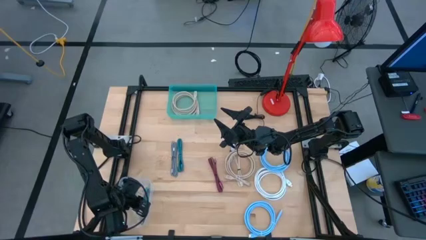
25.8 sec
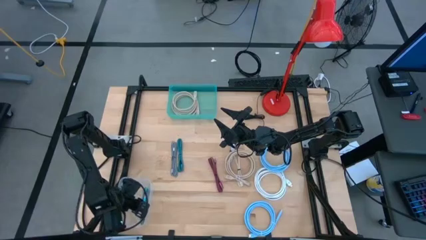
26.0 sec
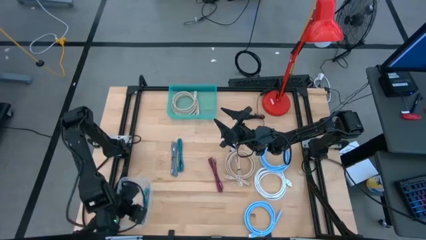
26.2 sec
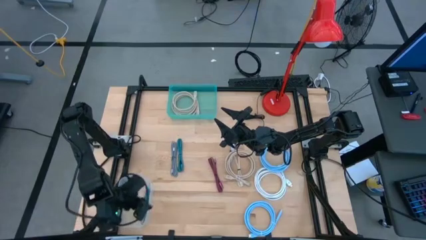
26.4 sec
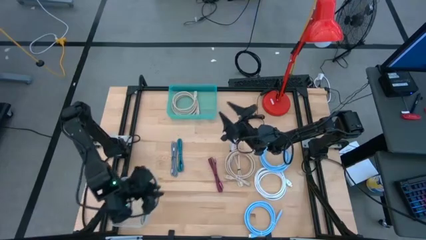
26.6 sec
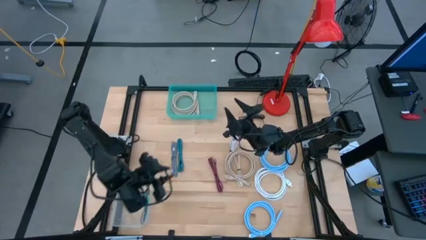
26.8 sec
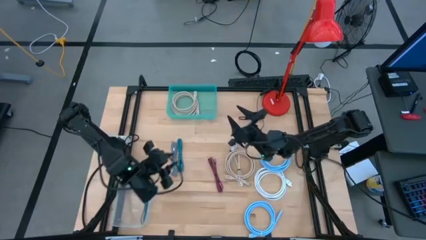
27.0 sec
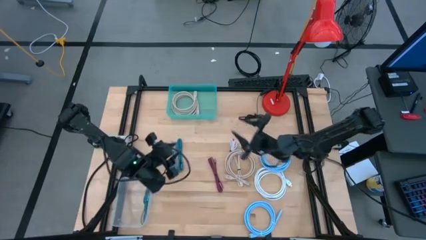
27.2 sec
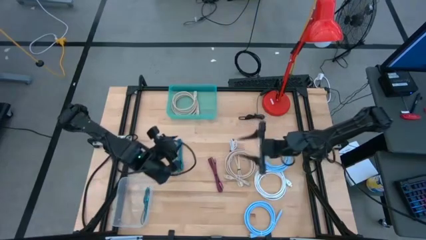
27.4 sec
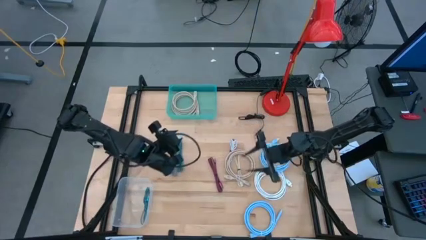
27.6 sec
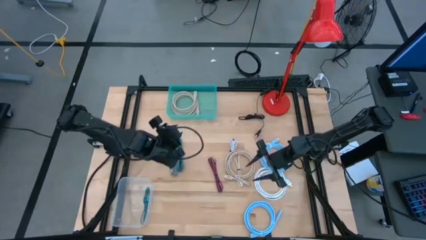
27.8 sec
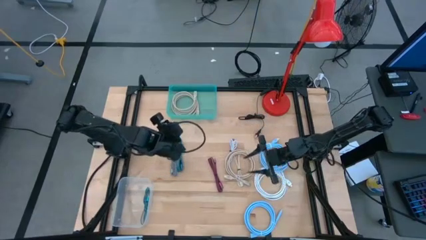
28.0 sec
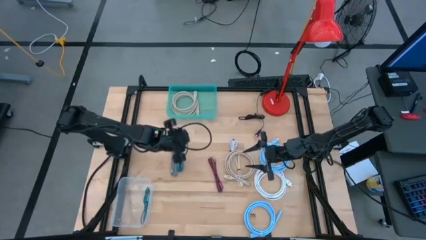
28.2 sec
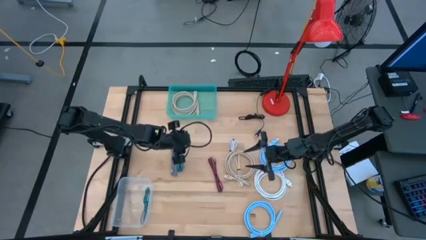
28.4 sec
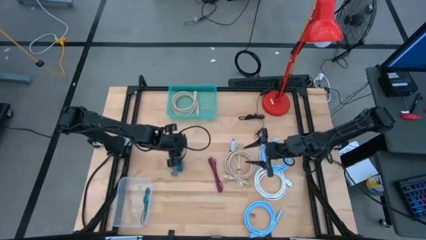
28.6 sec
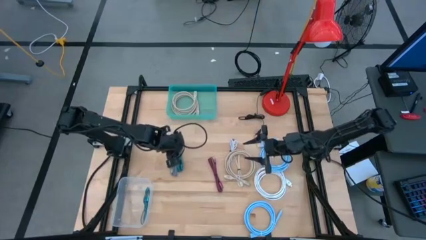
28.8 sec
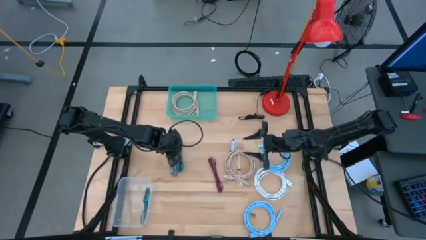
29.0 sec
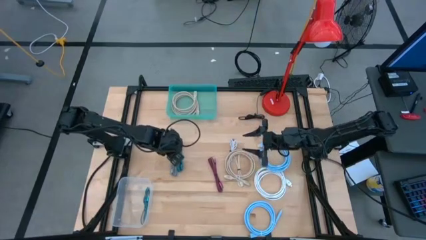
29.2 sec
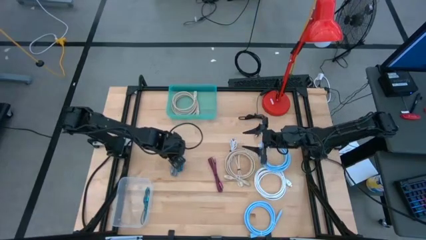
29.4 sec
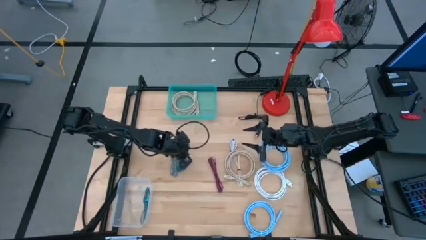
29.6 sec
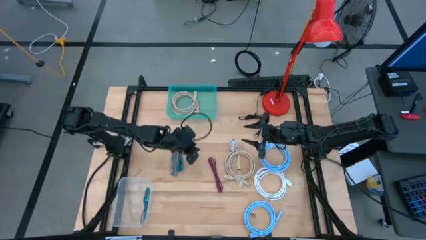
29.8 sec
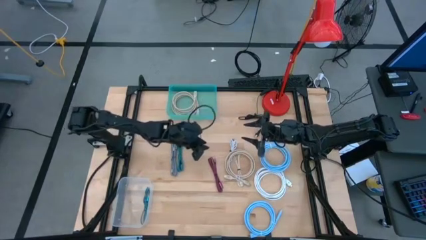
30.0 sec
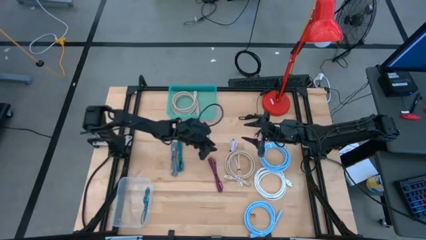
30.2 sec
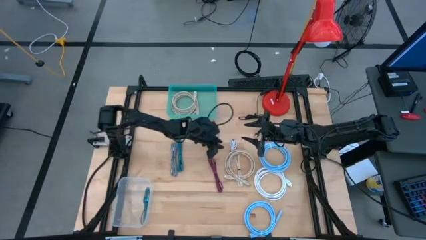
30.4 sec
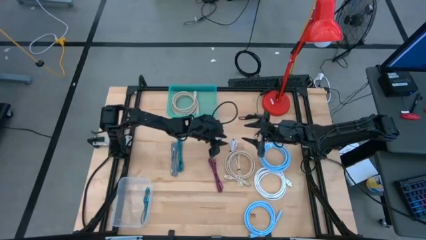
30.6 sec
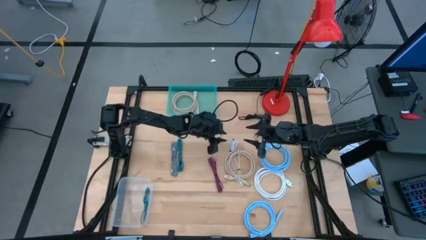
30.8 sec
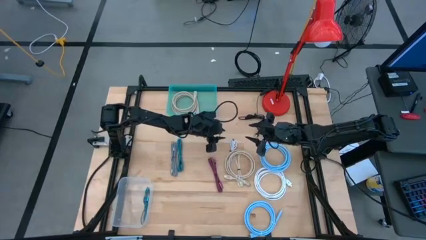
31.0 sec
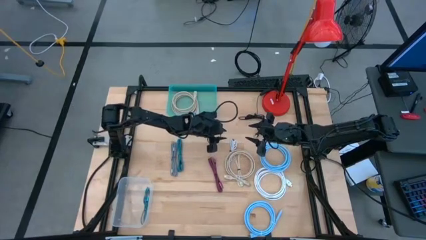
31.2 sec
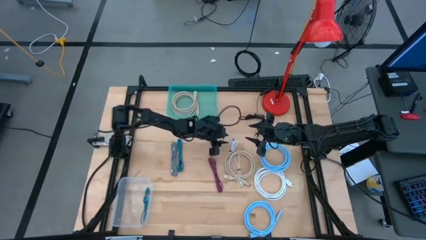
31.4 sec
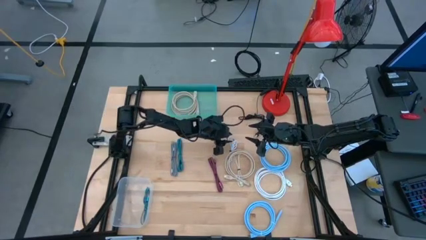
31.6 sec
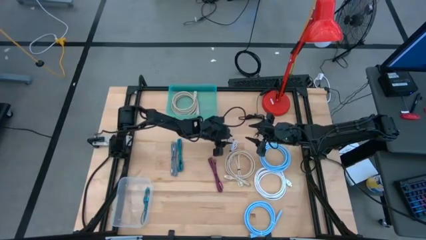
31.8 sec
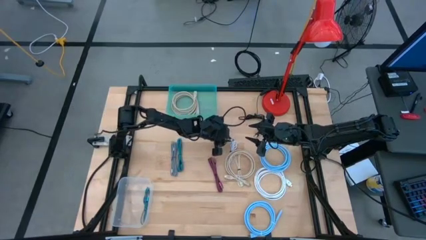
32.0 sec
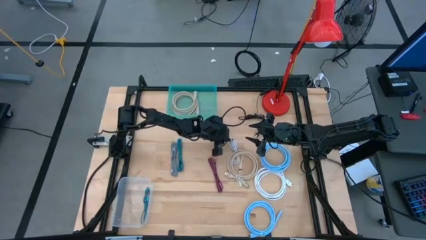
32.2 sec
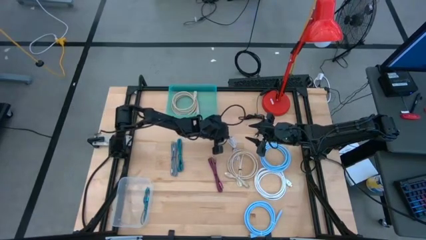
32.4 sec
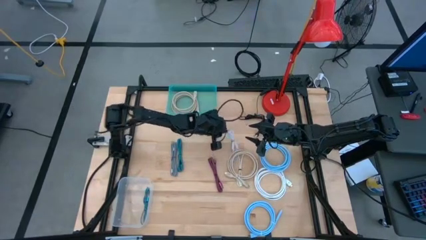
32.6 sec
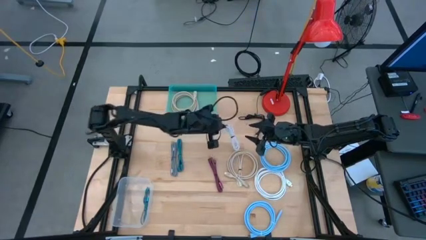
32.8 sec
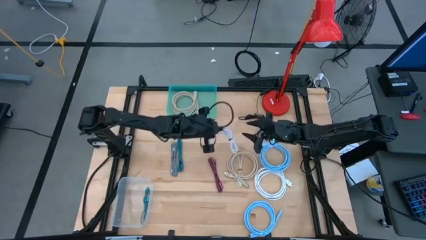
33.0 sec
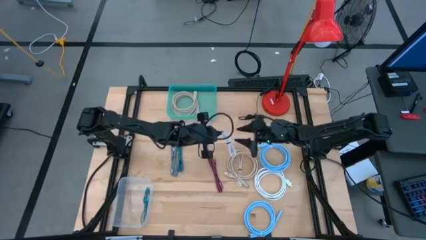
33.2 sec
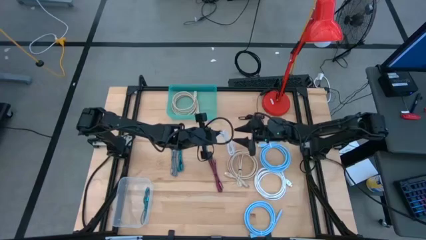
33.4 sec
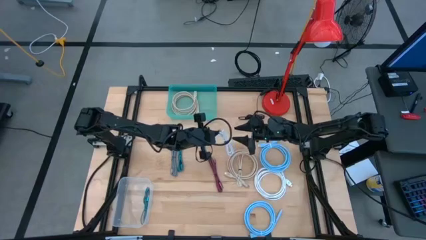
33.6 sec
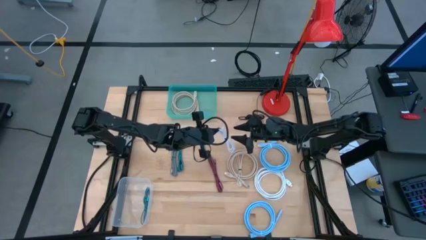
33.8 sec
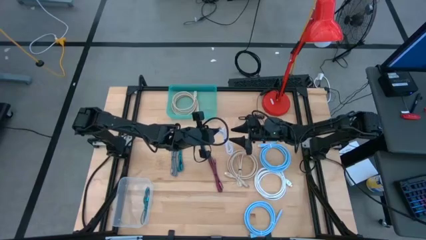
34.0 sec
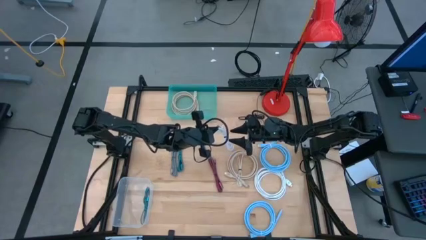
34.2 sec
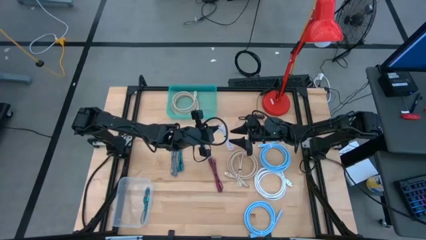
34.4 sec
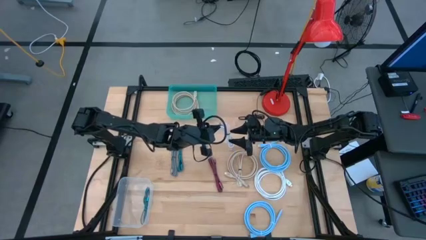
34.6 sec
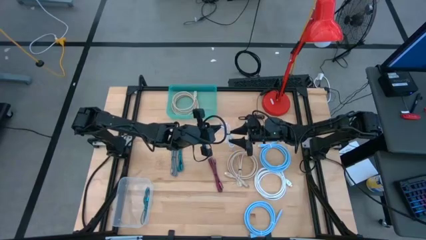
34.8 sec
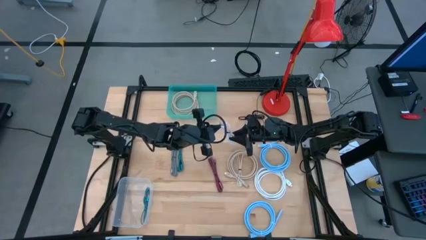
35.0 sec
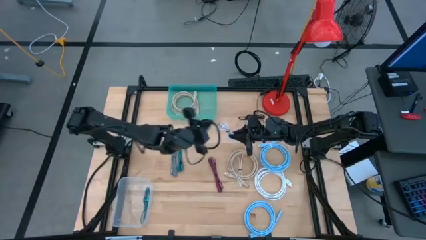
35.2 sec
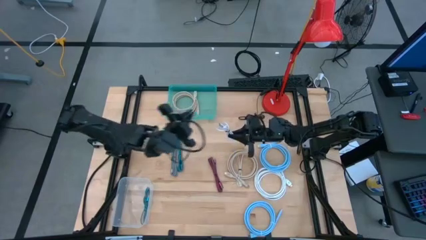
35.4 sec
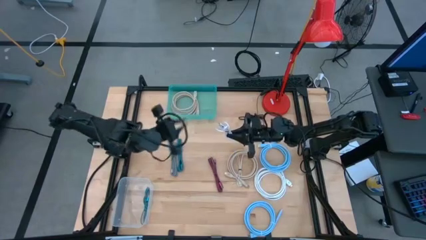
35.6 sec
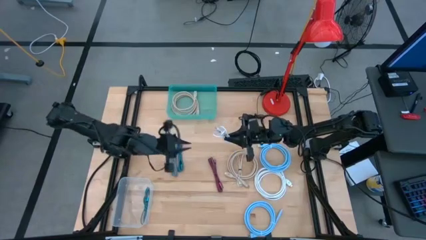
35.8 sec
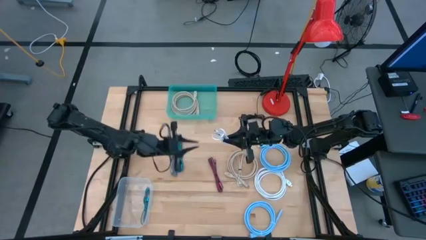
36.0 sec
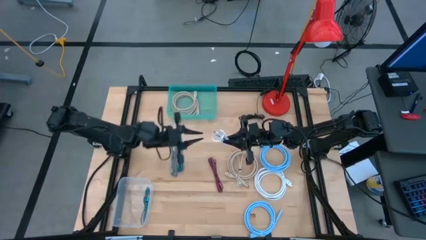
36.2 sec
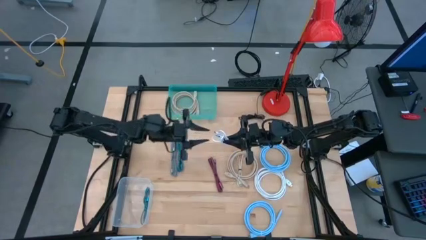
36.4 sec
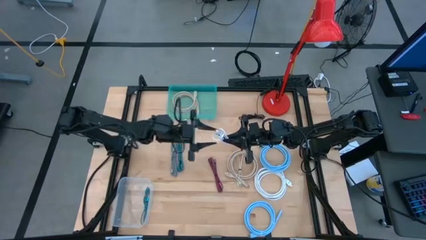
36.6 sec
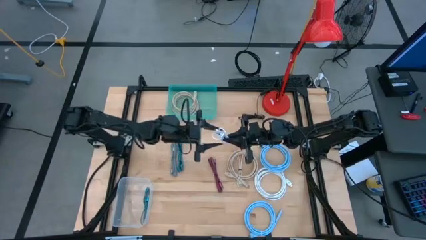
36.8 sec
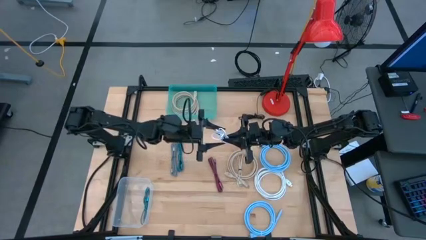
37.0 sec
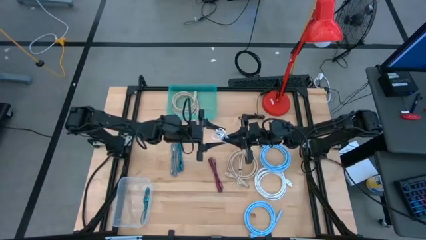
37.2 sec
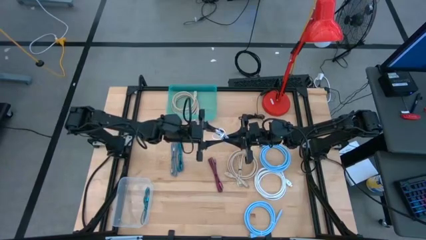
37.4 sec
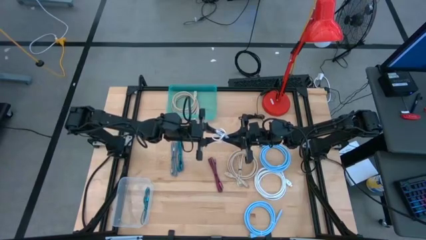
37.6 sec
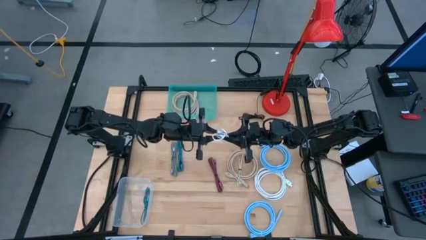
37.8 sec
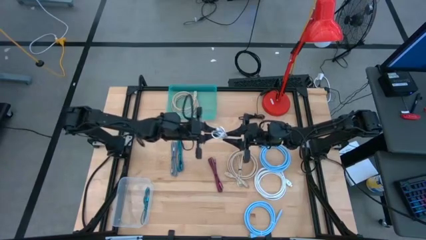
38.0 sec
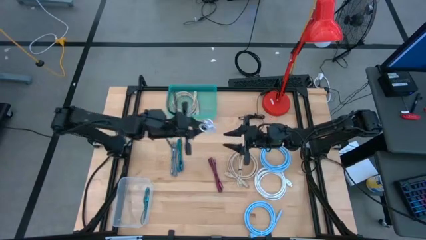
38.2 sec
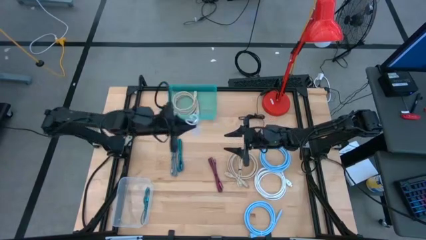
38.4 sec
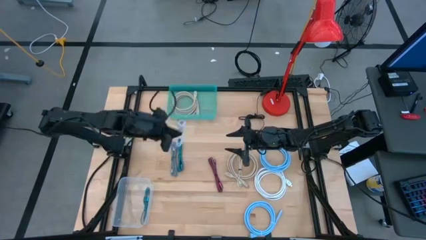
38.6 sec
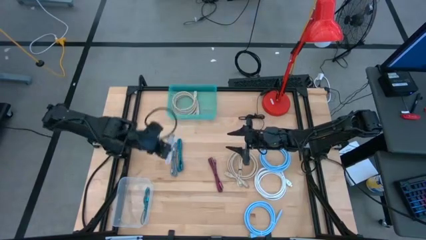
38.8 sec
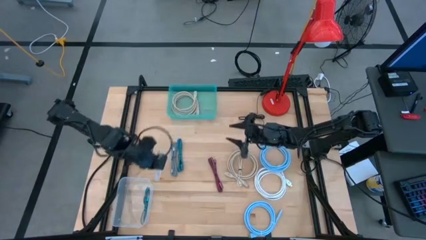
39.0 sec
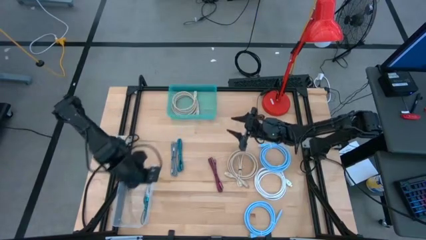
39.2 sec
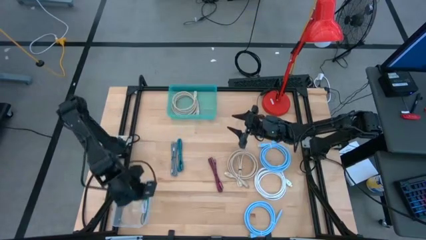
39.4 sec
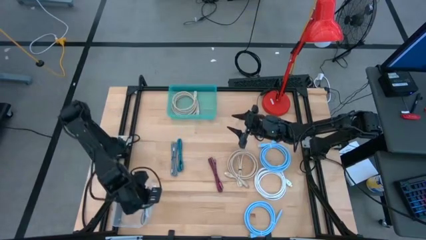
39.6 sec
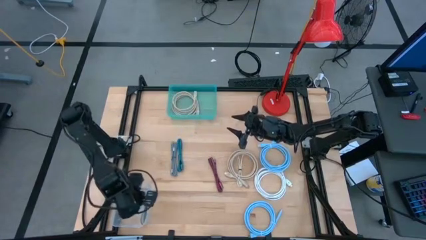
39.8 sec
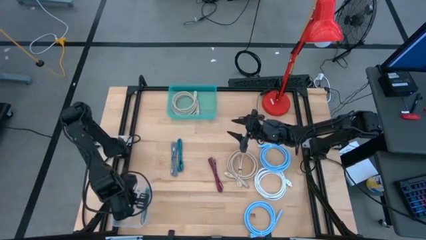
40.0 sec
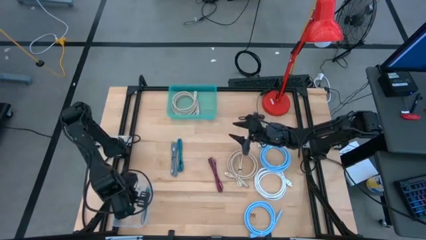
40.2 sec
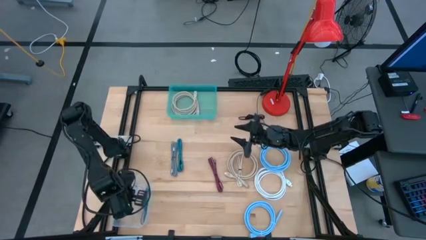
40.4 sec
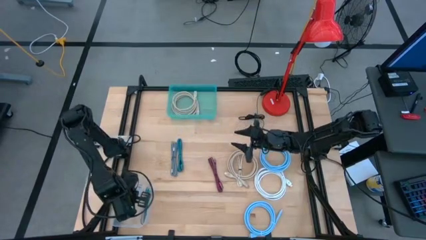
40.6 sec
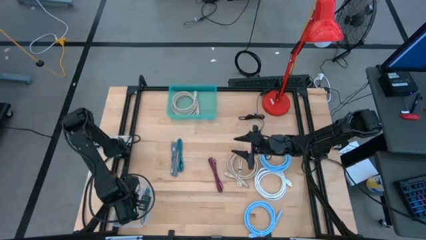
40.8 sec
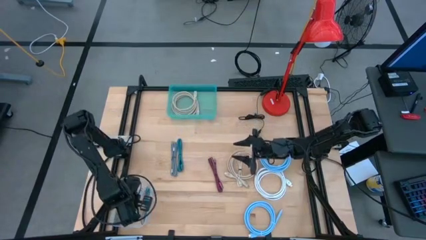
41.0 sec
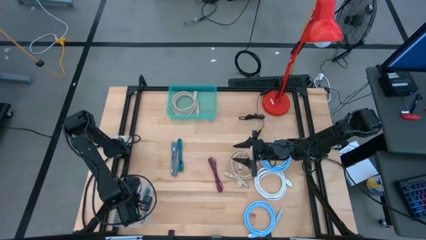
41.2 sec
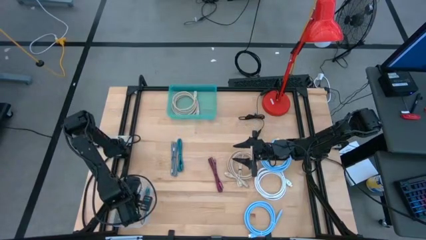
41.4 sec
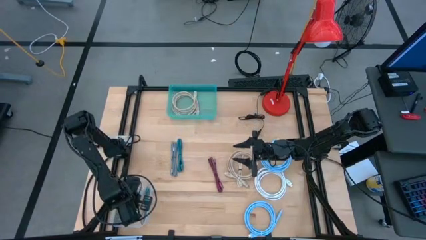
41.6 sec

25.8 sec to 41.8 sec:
Task: Pick & Place USB Port
Put the white charger cable into the transparent bin

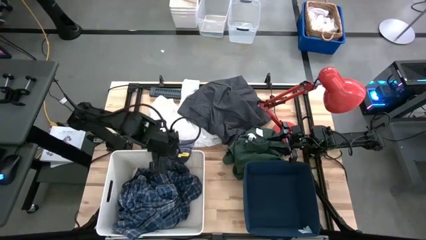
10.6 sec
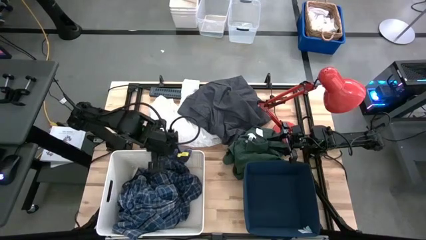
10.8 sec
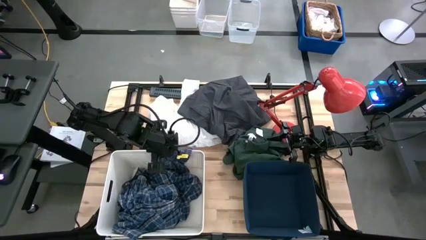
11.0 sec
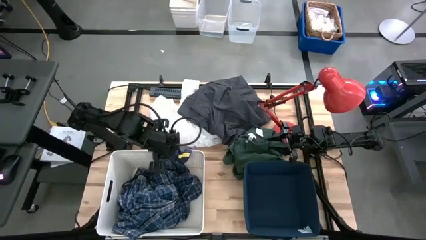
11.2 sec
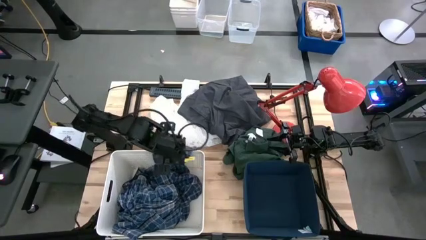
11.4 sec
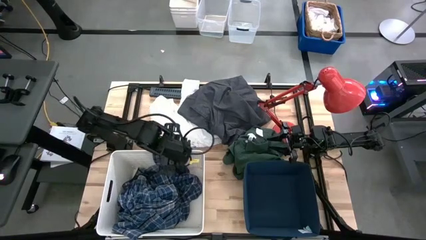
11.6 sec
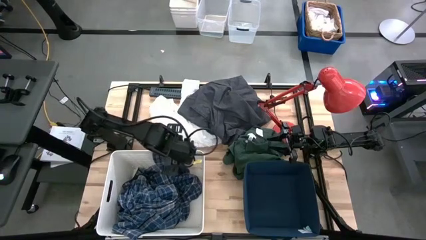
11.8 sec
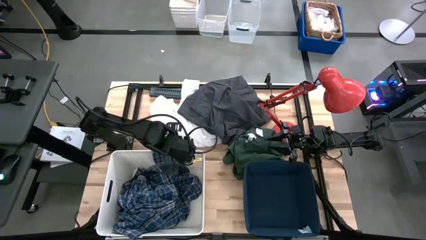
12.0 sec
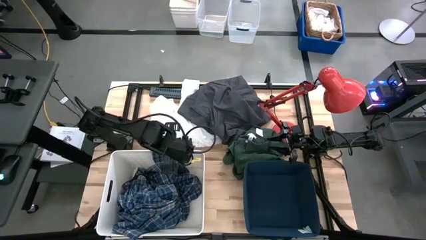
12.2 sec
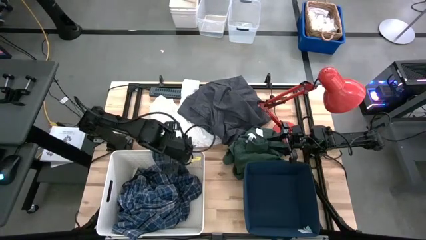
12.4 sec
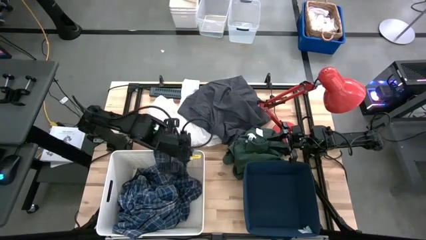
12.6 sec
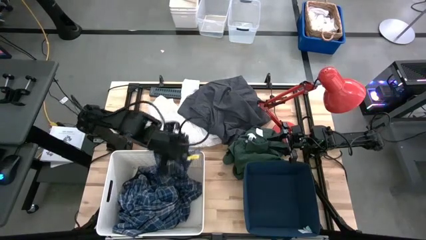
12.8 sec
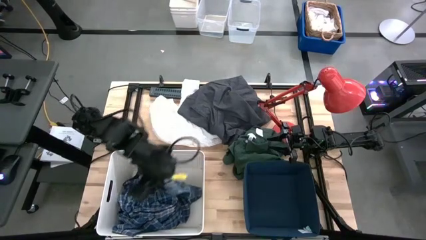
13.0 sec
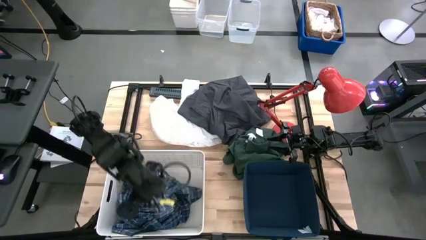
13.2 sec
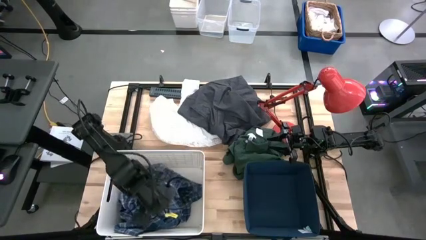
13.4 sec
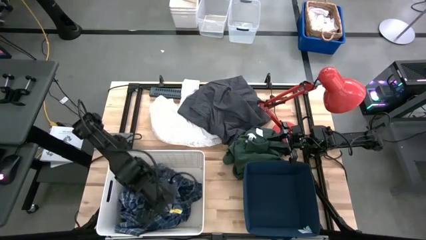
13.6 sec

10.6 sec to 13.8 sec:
Task: Sort clothes
Put the blue checkered pajamas into the white bin
